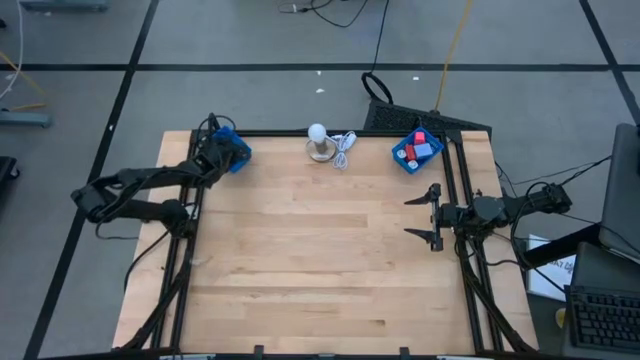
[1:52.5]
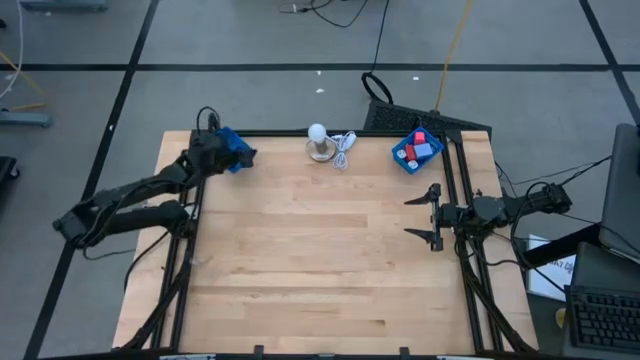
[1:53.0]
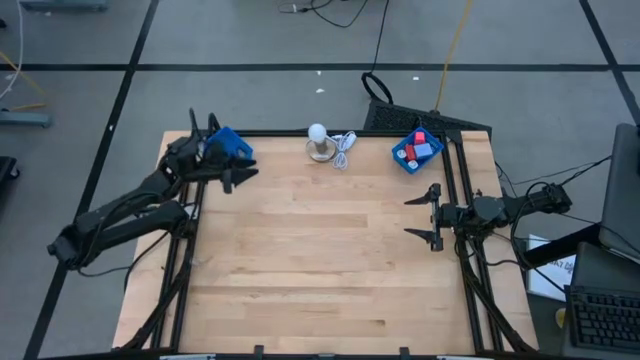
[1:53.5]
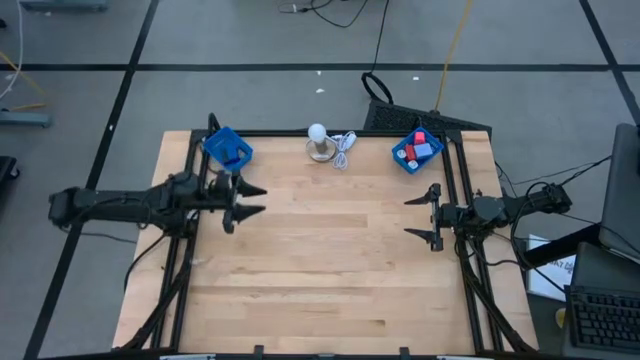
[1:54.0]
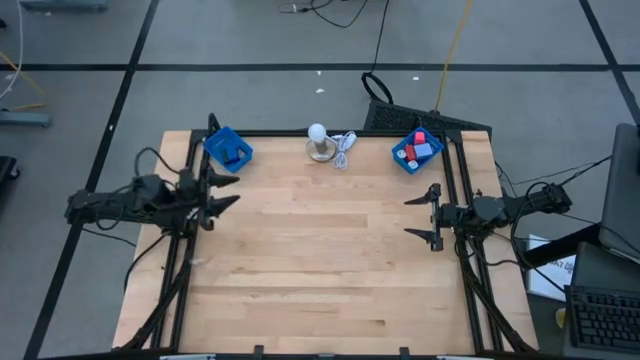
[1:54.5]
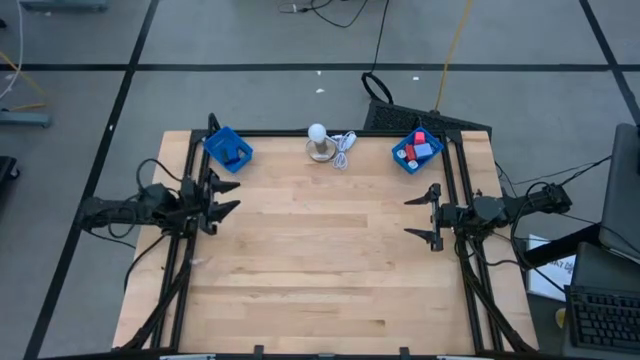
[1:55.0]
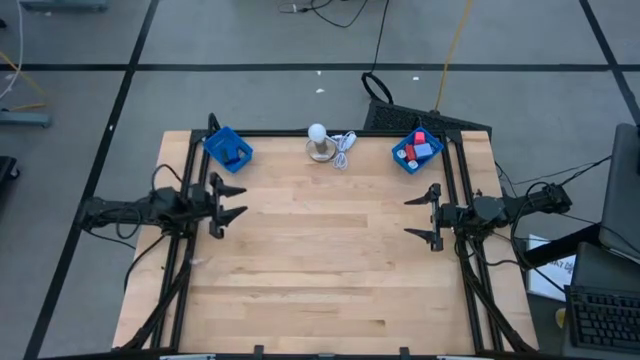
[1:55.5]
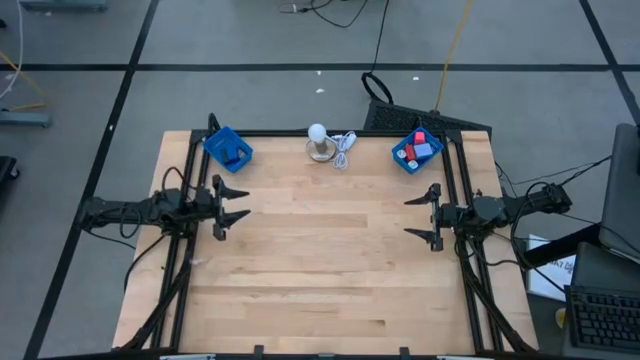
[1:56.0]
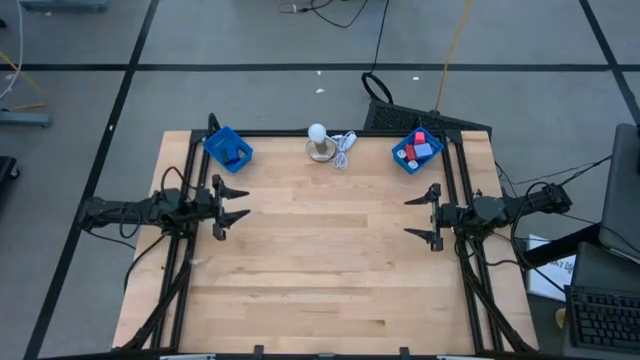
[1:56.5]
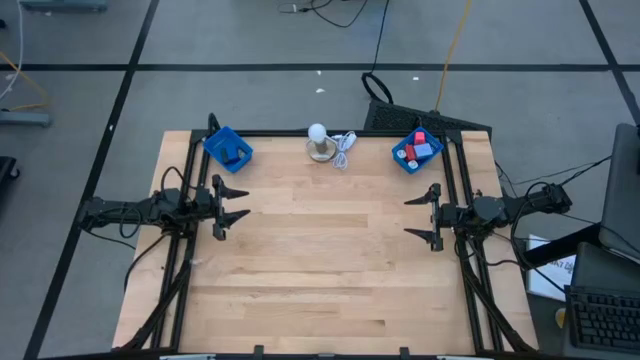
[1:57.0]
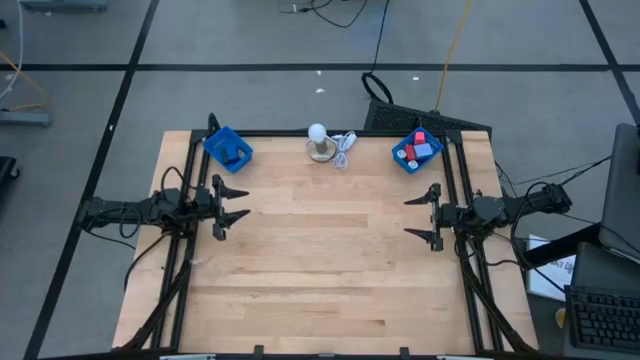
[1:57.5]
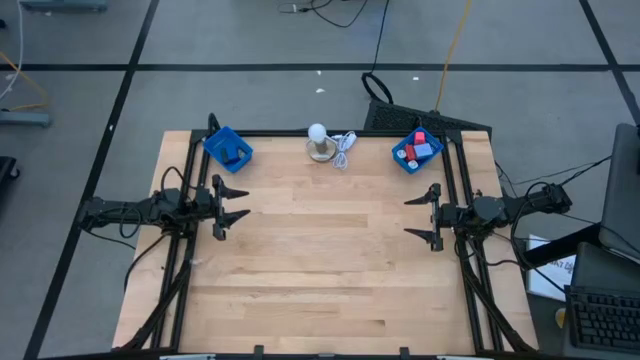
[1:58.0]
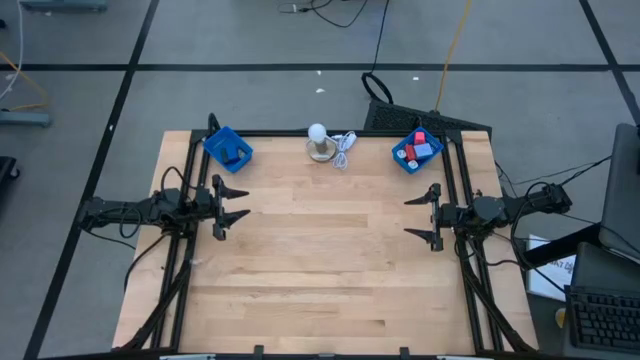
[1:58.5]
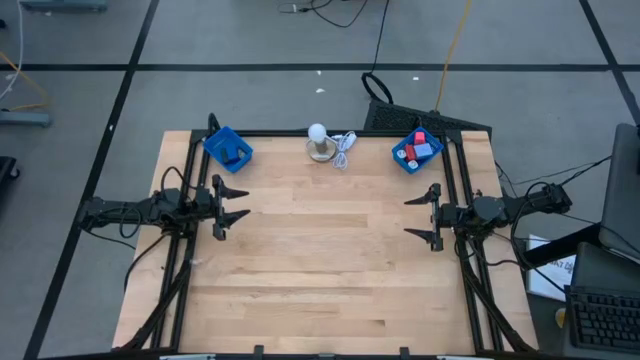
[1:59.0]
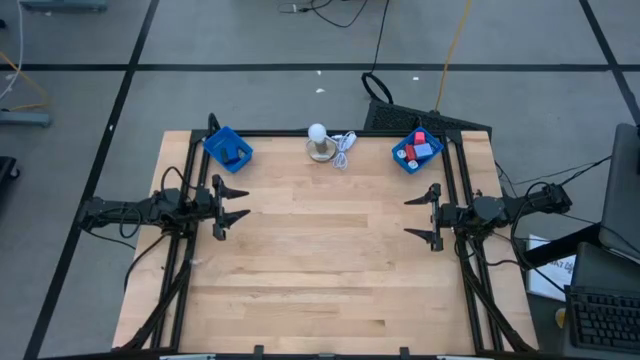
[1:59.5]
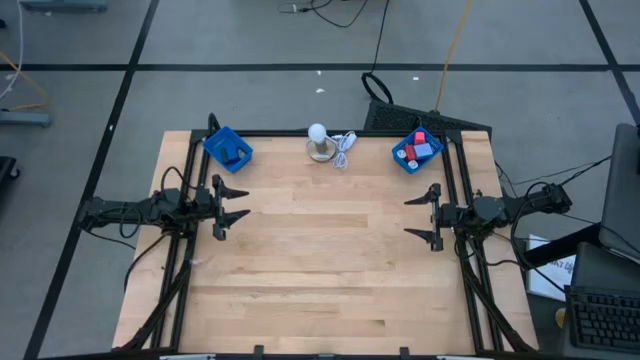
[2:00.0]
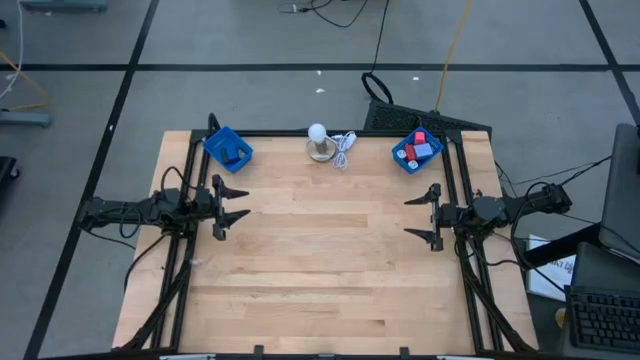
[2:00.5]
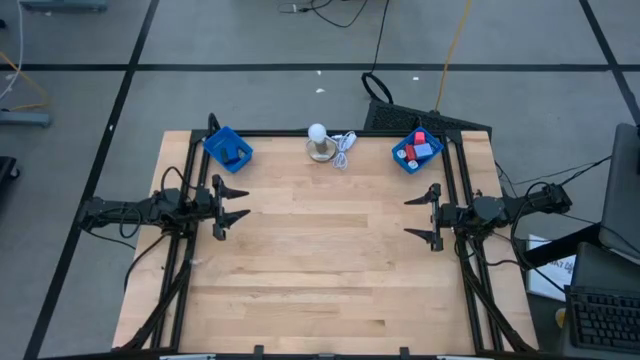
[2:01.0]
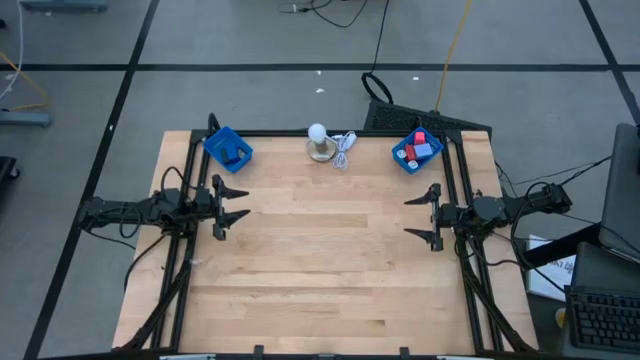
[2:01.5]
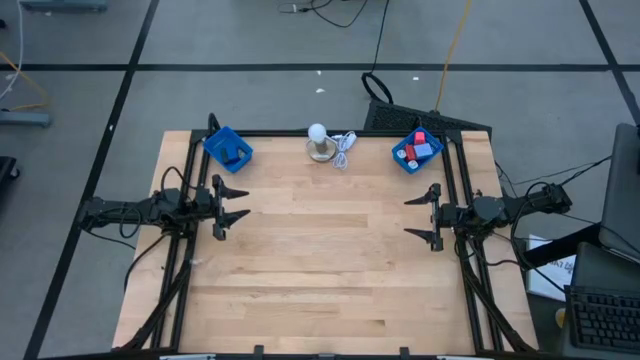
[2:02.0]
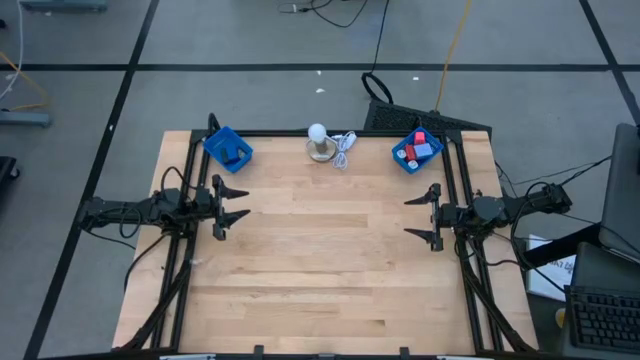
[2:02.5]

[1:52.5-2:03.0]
Task: Pick & Place Office items
Return to Home Position

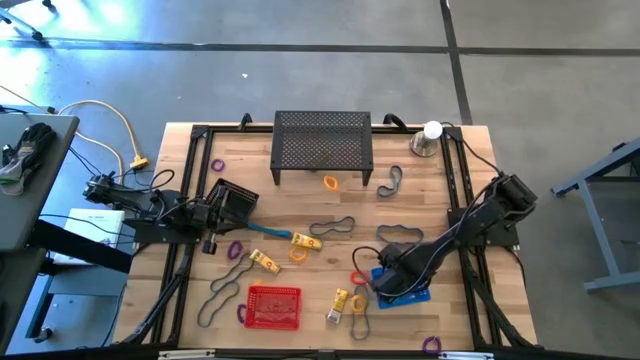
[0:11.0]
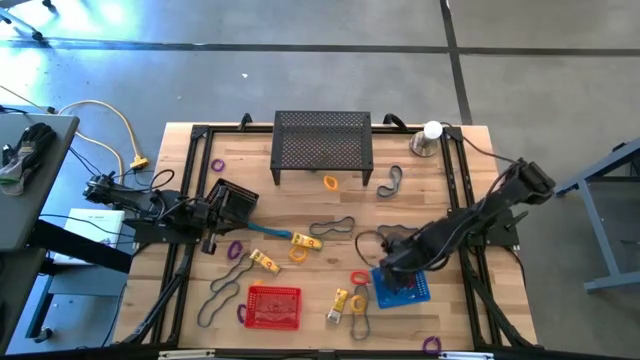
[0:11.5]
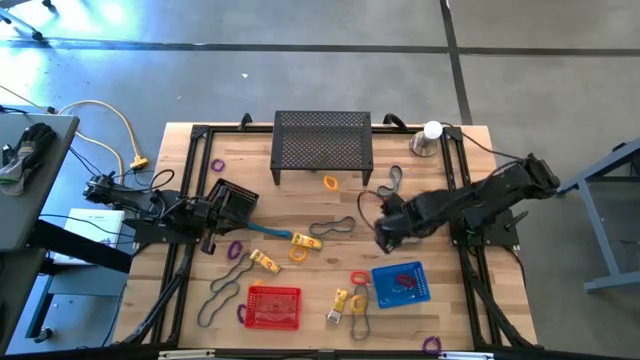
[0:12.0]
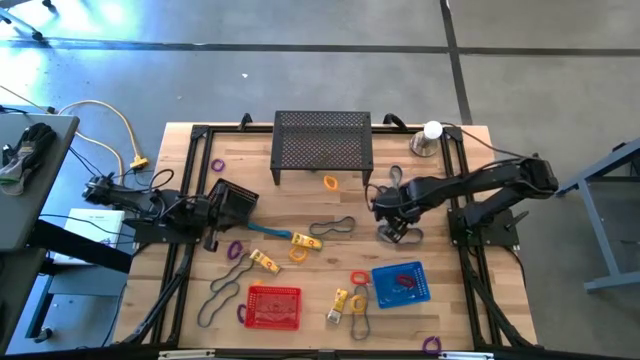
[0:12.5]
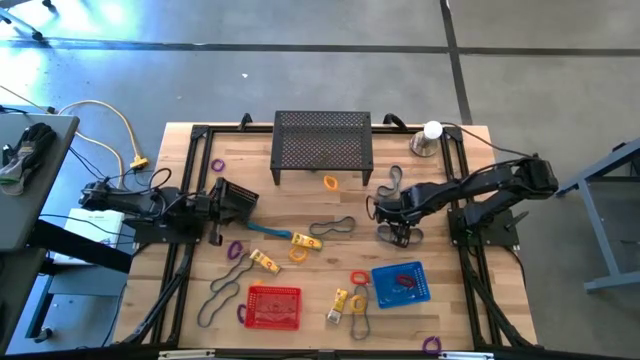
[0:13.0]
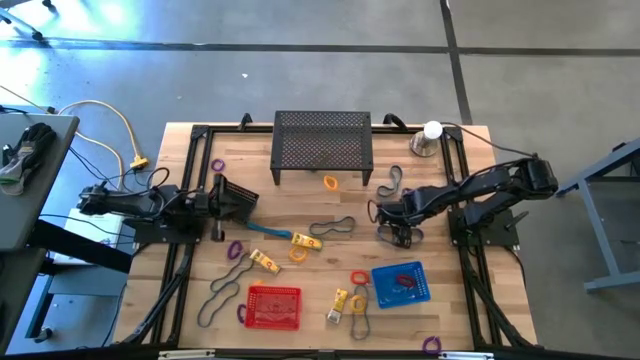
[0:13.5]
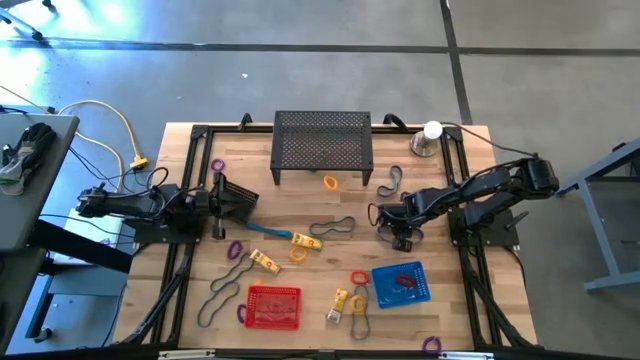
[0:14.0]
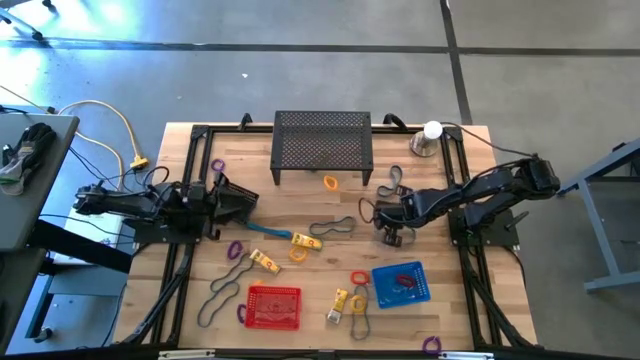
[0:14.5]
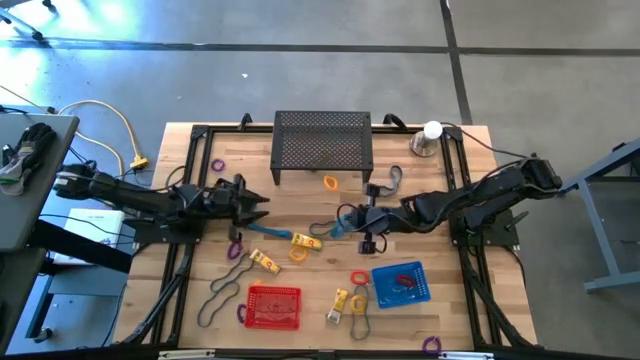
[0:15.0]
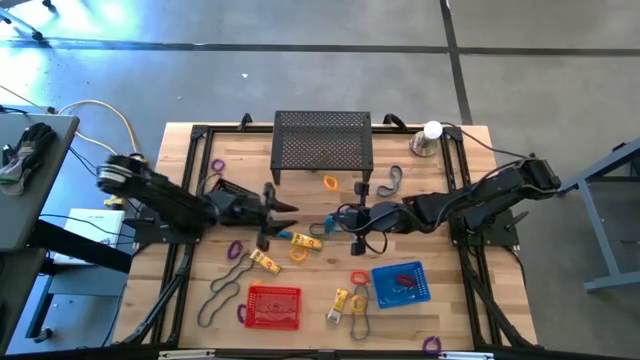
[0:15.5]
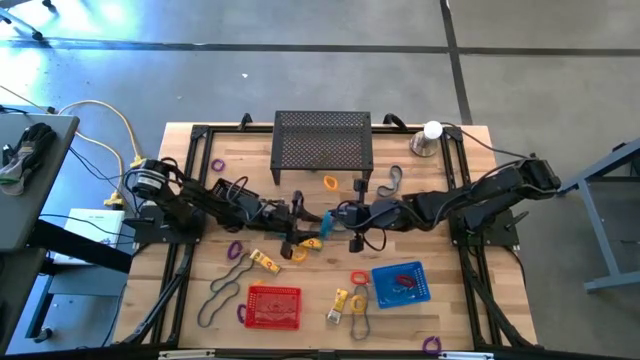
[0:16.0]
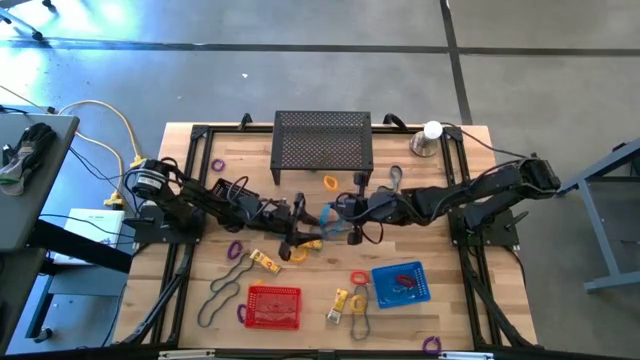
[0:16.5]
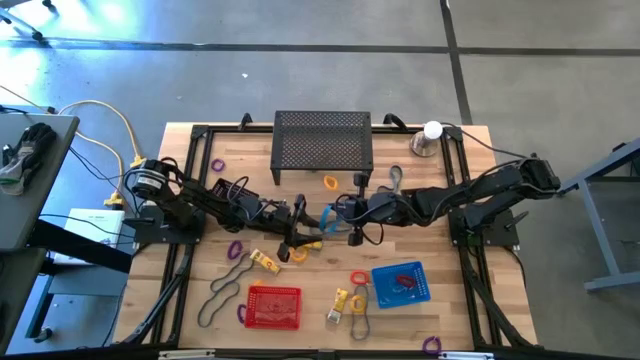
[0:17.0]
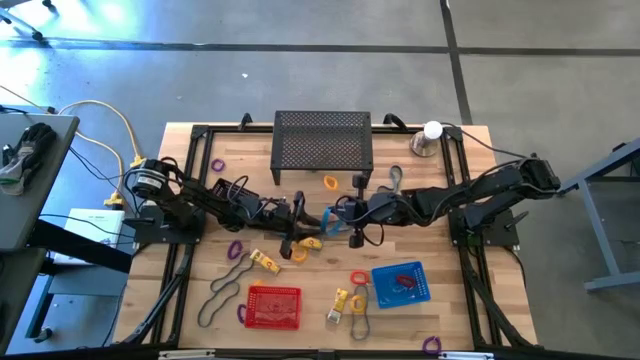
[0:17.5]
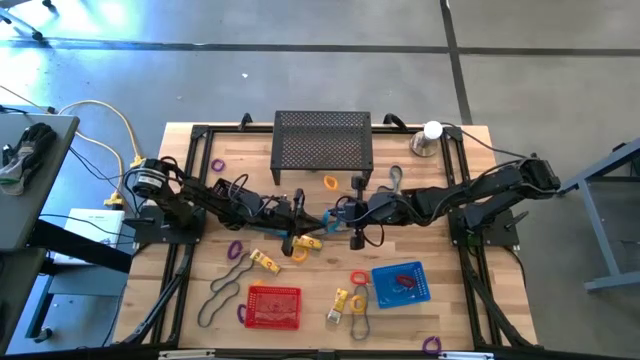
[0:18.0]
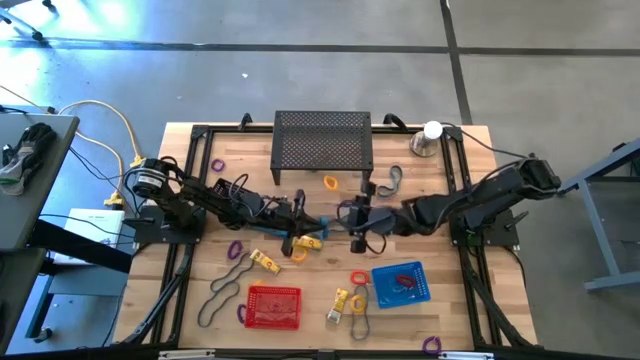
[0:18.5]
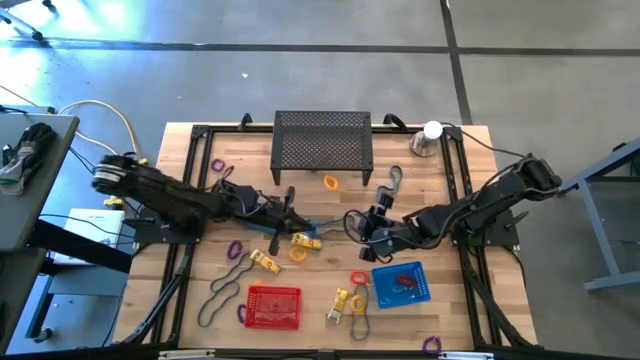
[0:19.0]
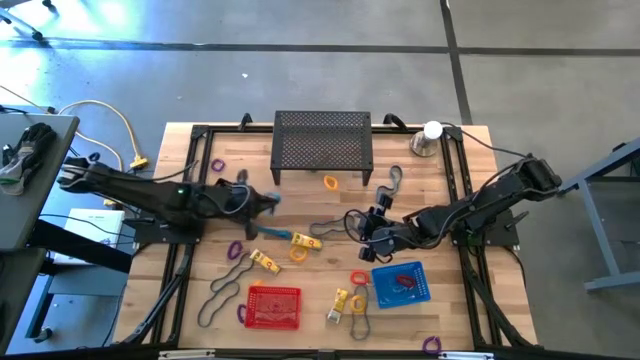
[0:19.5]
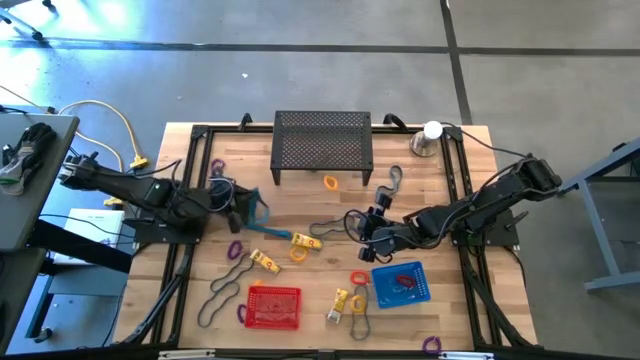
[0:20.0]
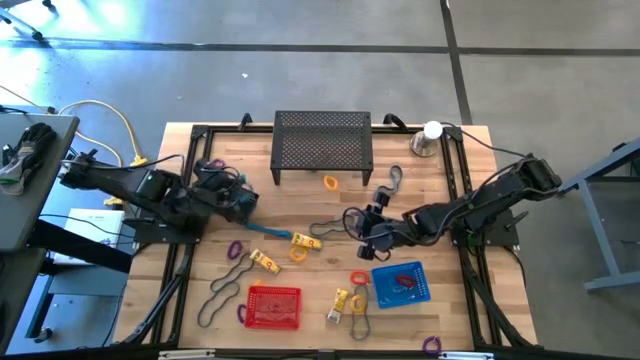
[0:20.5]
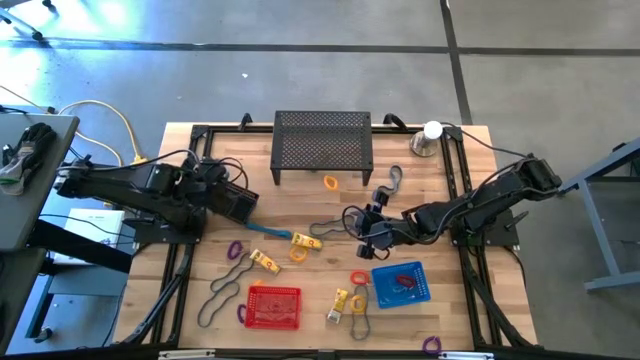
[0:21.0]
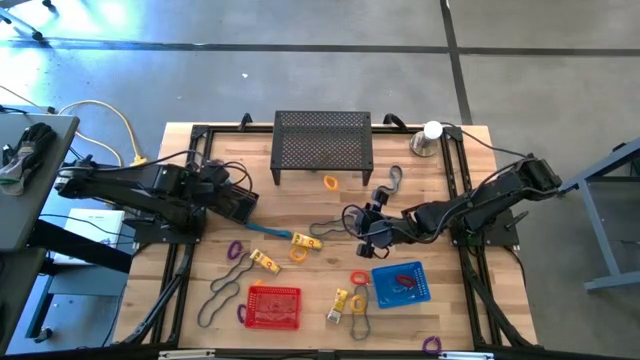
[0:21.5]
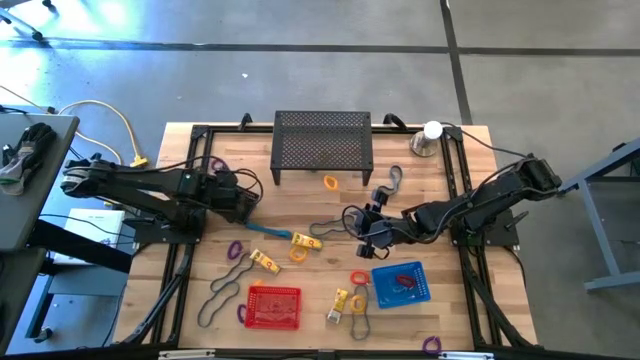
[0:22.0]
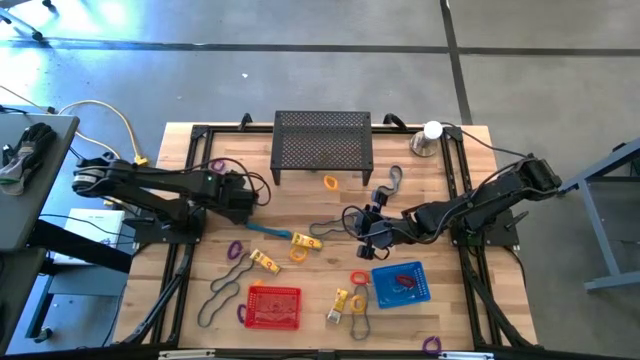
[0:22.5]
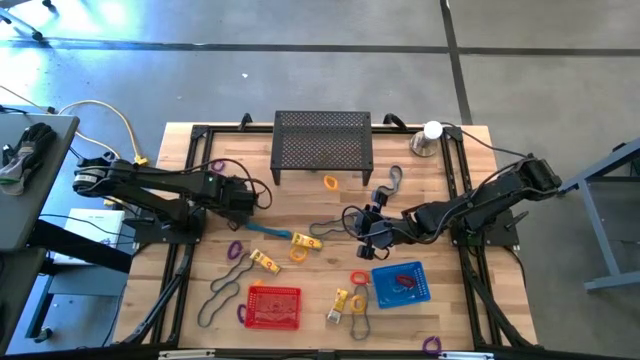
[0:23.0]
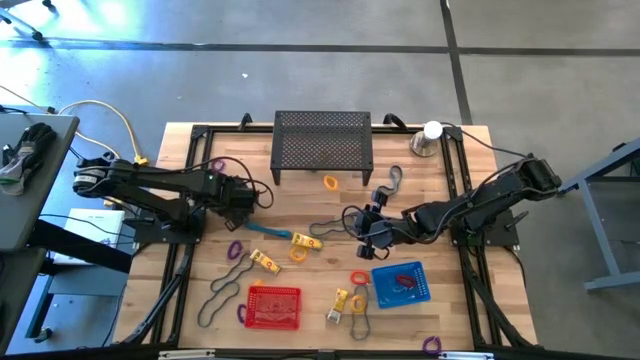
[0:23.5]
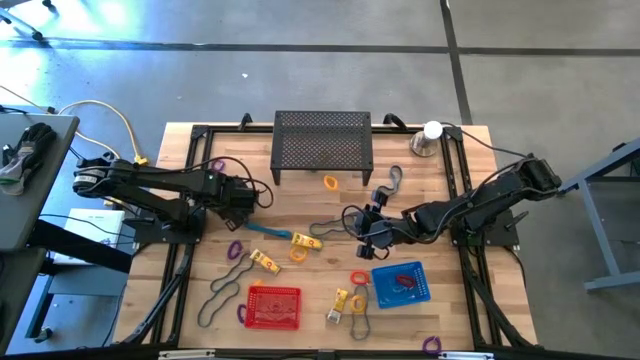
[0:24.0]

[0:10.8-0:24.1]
Task: Pick & Place Office Desk Supplies
Put the blue rubber band into the black bin
